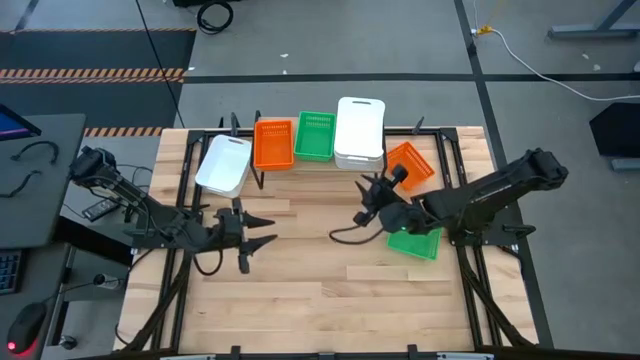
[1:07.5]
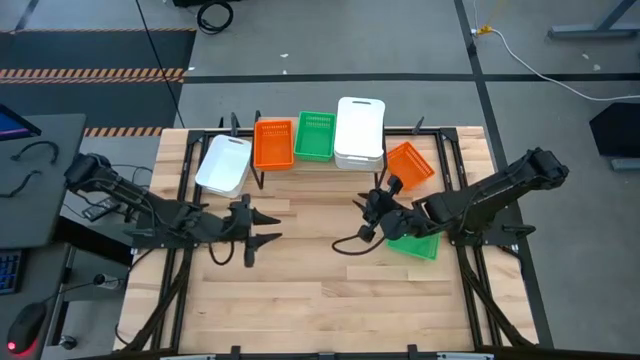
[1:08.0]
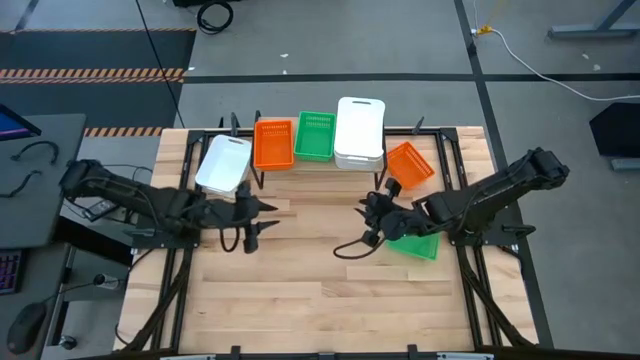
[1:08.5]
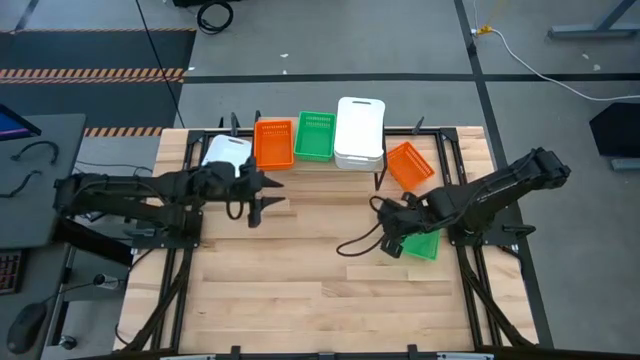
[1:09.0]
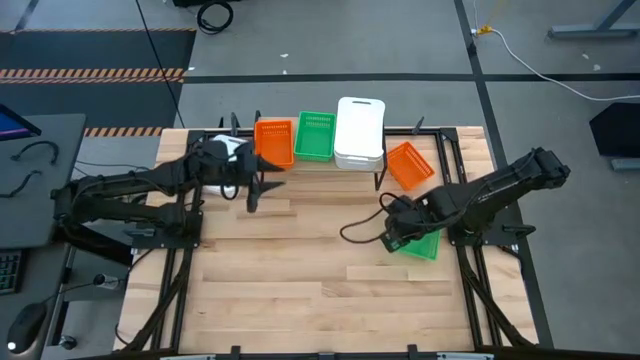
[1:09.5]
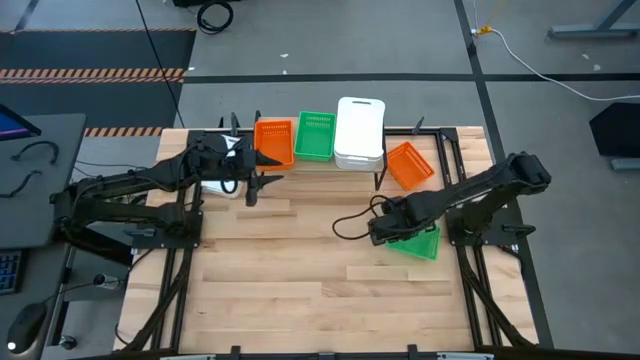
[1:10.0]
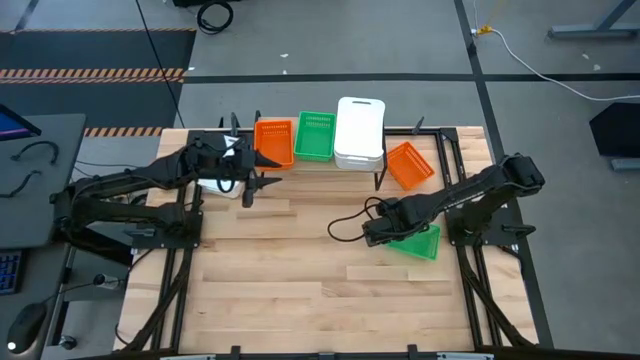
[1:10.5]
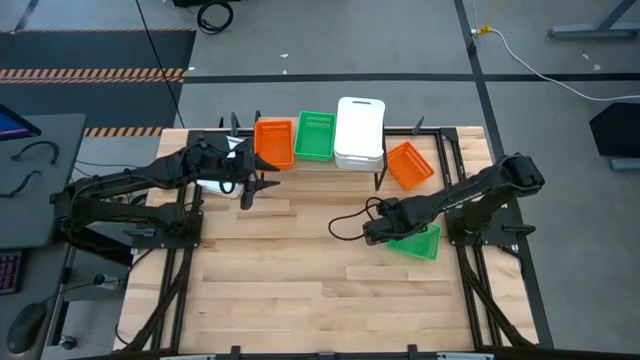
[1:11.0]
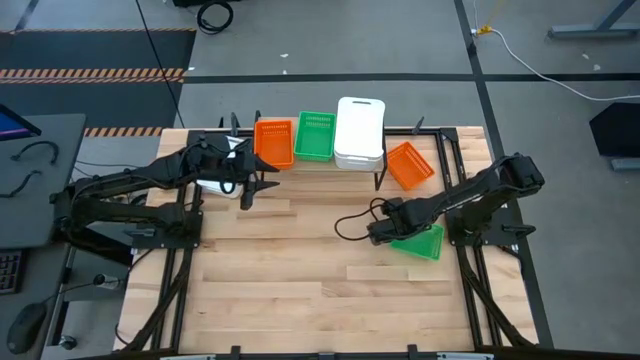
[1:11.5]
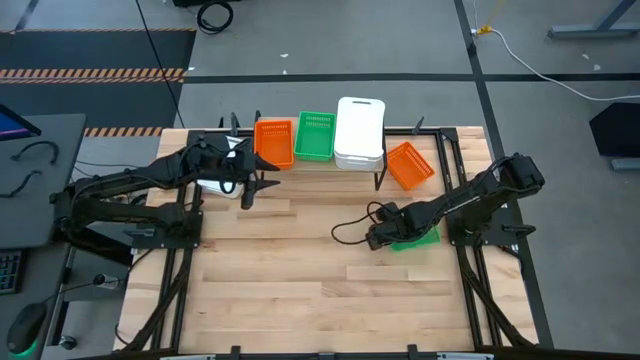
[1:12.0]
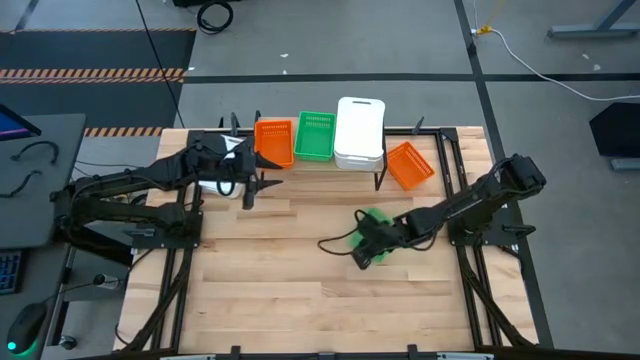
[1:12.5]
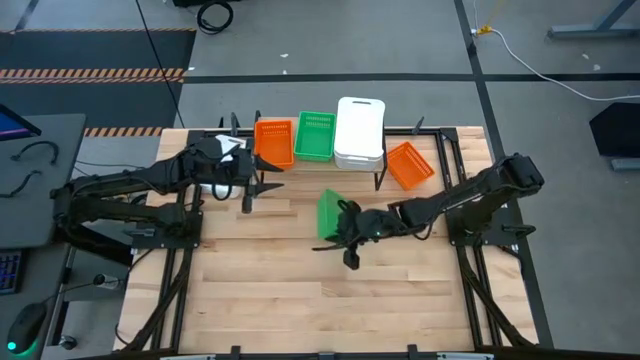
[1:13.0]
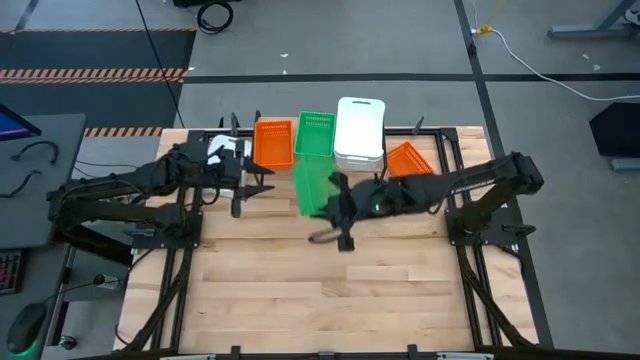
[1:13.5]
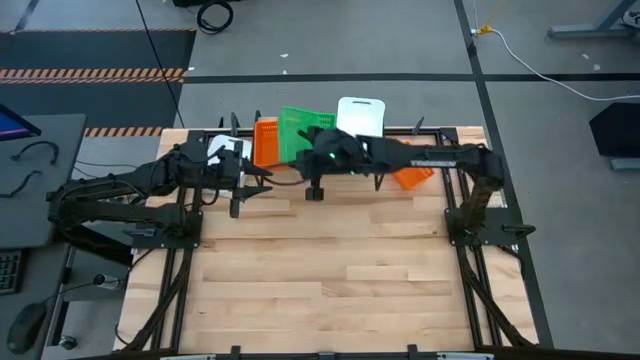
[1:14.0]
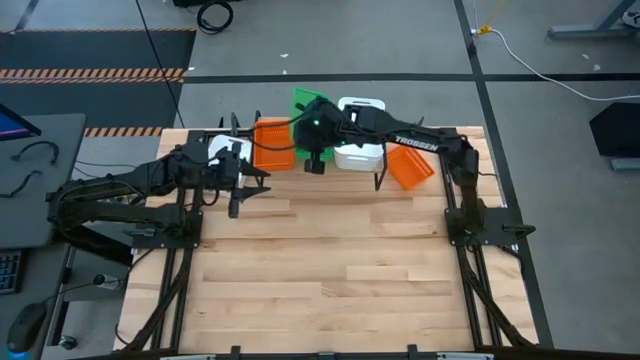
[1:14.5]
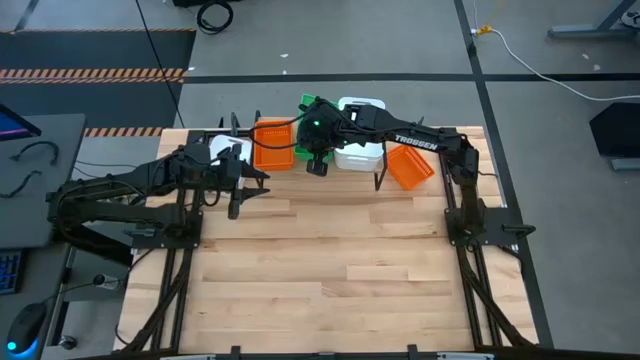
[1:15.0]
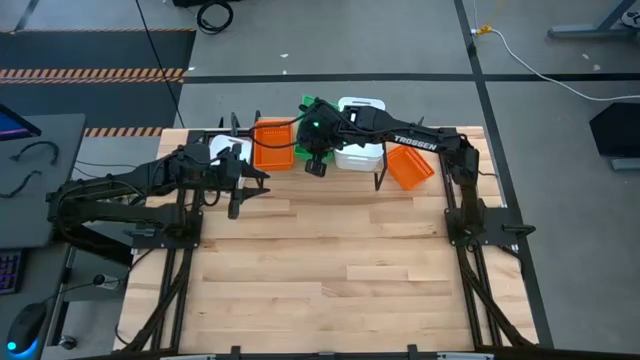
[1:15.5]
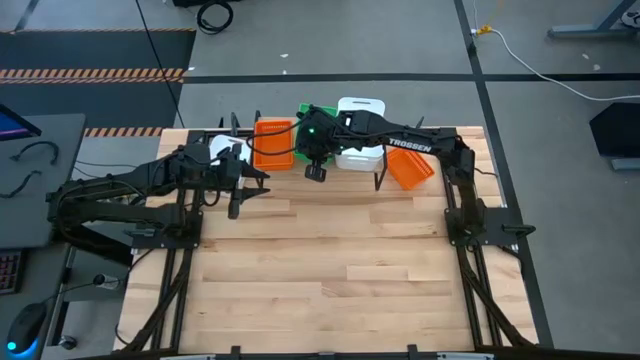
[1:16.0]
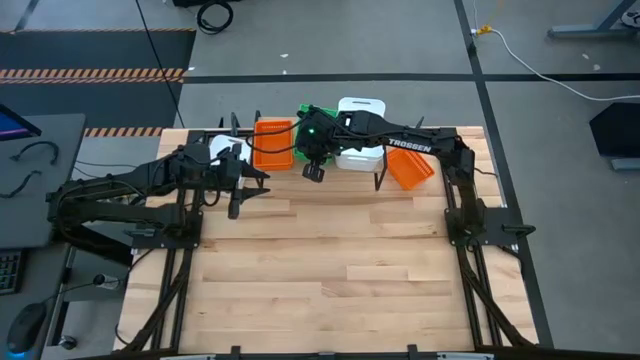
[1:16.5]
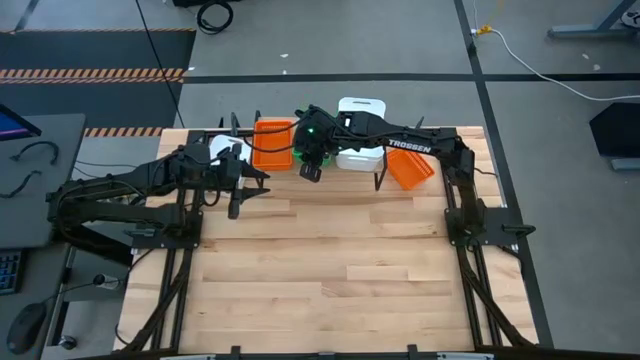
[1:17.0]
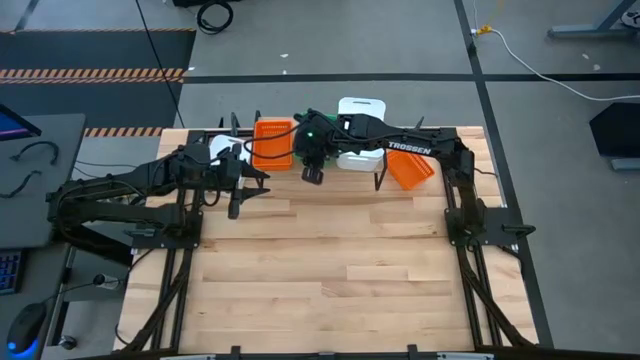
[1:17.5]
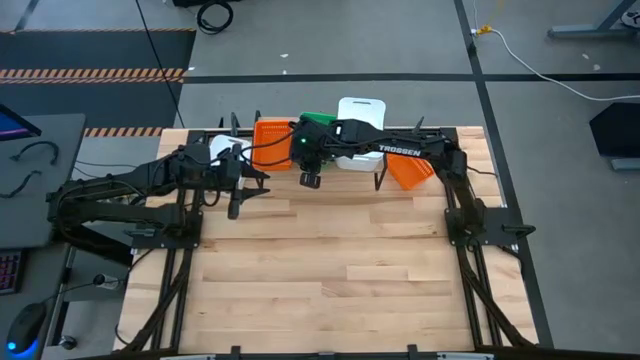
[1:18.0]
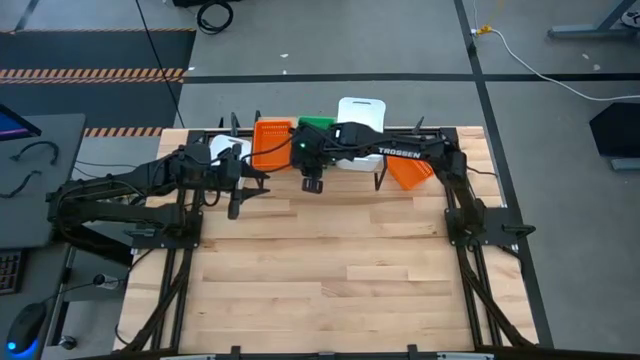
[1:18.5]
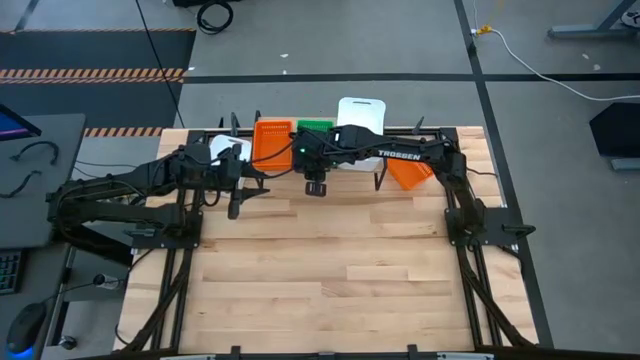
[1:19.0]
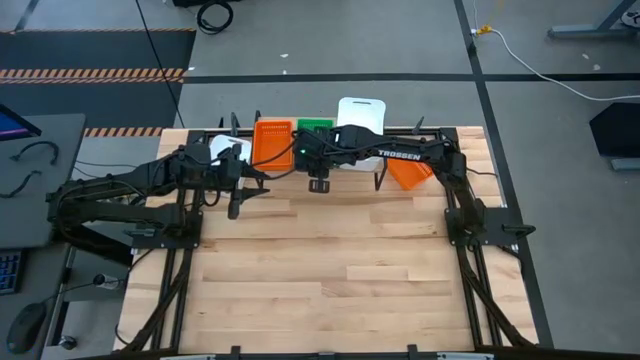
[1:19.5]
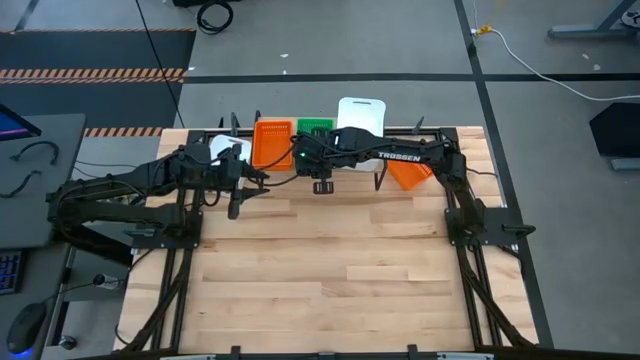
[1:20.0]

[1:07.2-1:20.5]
Task: Stack baskets on shelf by color
Stack the green bin on top of the stacked green bins on the shelf
